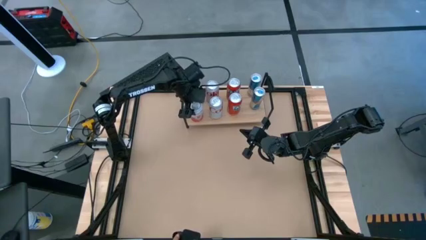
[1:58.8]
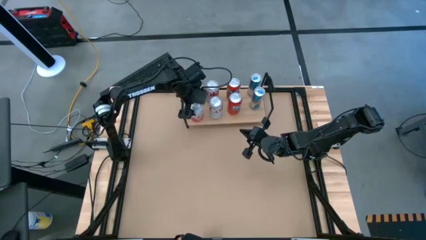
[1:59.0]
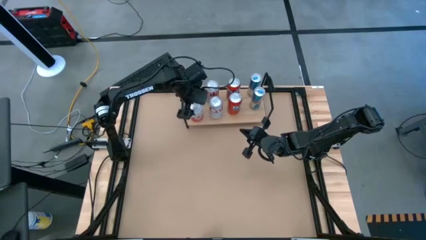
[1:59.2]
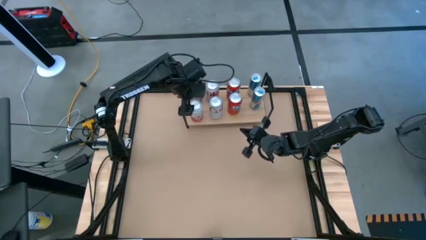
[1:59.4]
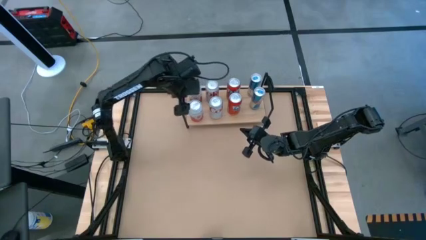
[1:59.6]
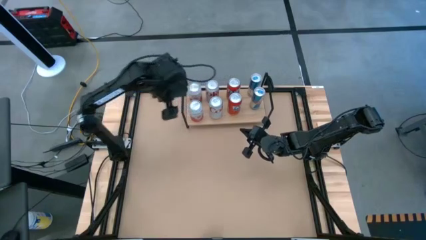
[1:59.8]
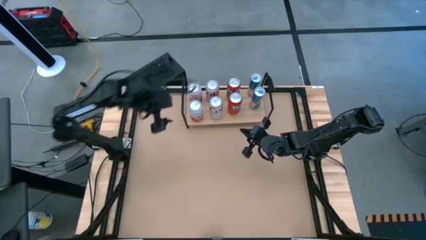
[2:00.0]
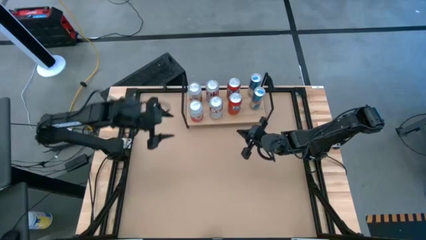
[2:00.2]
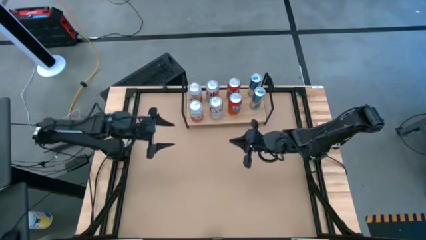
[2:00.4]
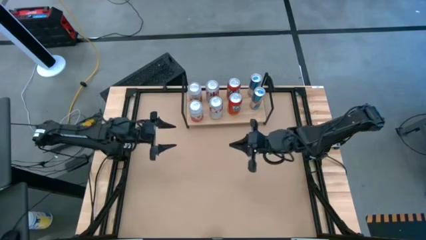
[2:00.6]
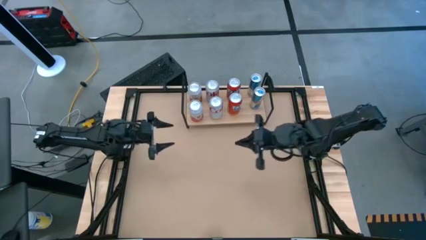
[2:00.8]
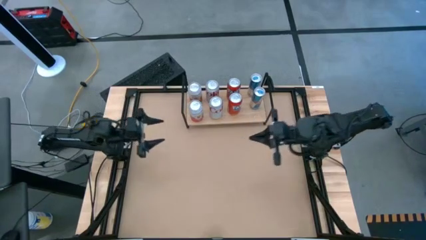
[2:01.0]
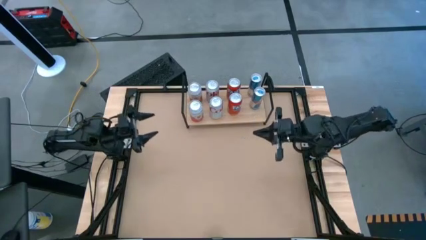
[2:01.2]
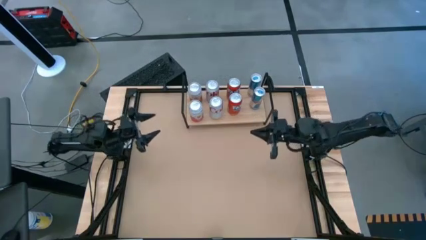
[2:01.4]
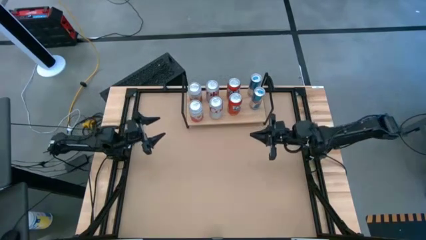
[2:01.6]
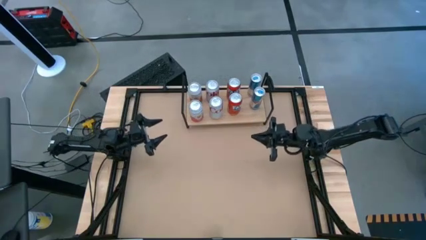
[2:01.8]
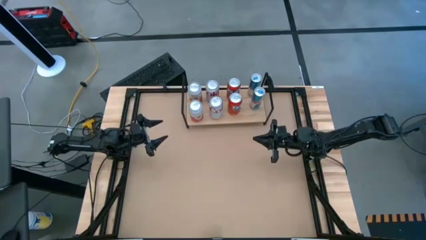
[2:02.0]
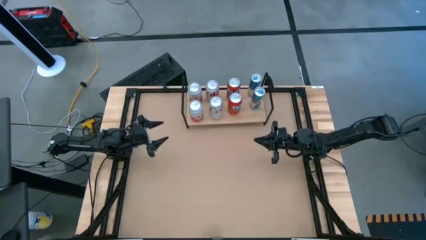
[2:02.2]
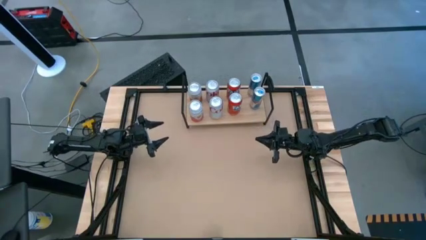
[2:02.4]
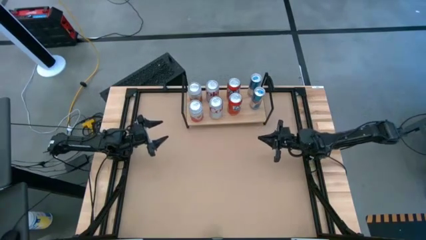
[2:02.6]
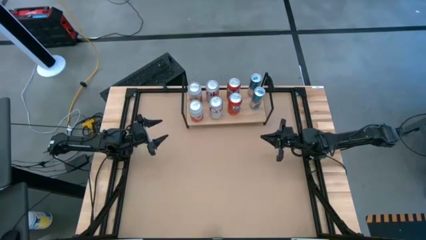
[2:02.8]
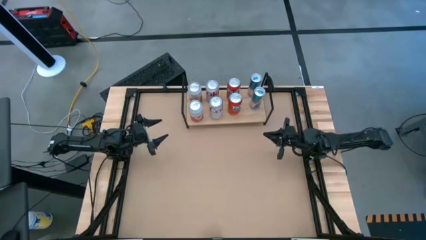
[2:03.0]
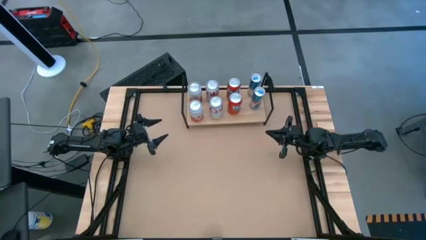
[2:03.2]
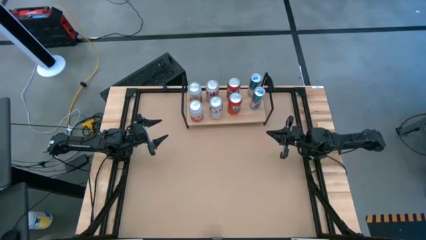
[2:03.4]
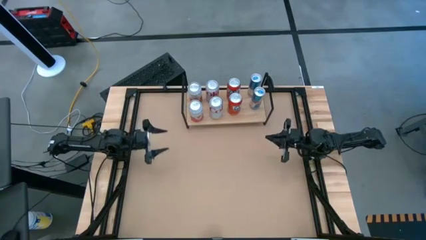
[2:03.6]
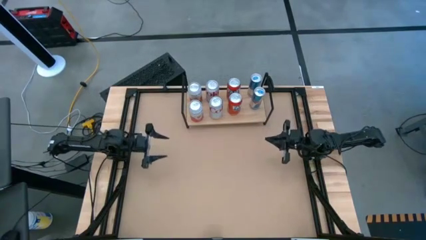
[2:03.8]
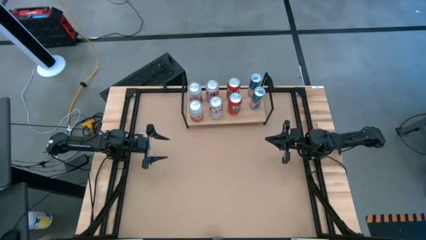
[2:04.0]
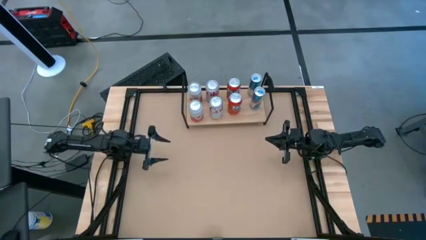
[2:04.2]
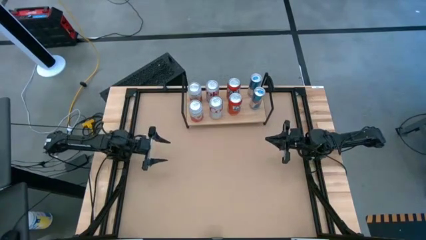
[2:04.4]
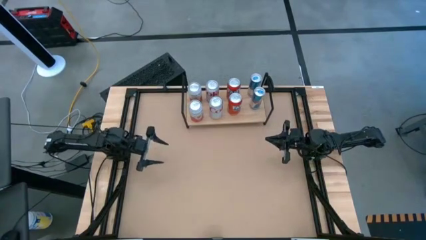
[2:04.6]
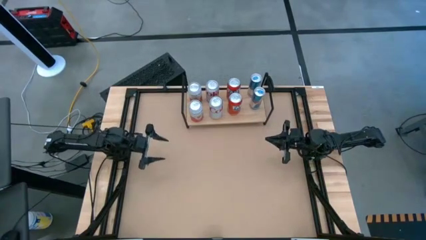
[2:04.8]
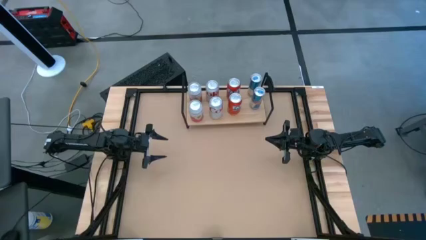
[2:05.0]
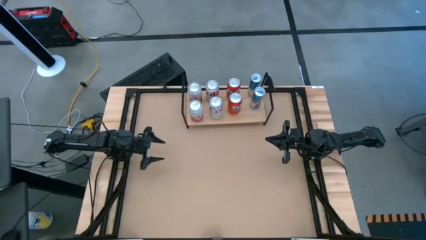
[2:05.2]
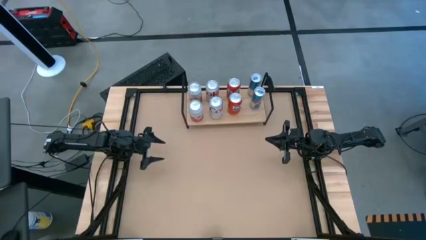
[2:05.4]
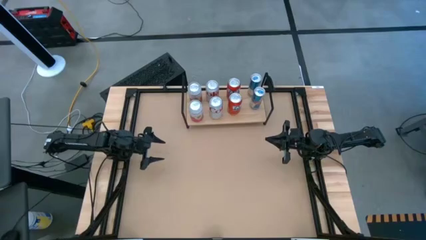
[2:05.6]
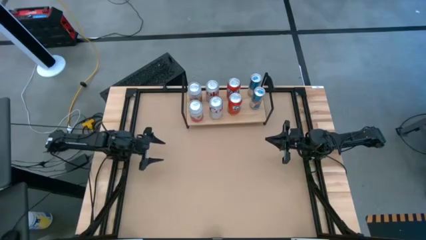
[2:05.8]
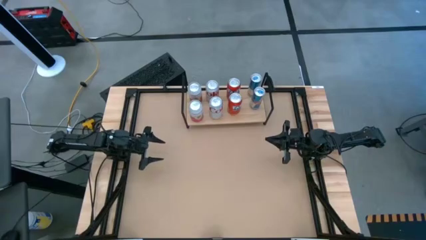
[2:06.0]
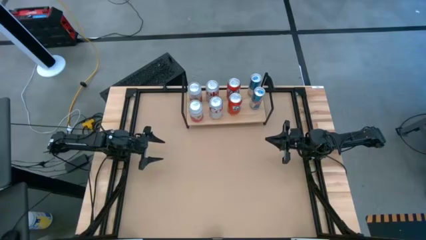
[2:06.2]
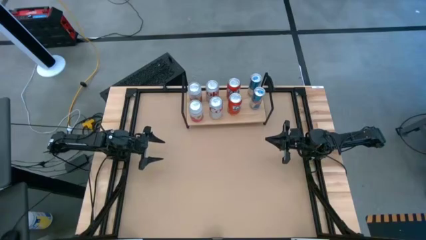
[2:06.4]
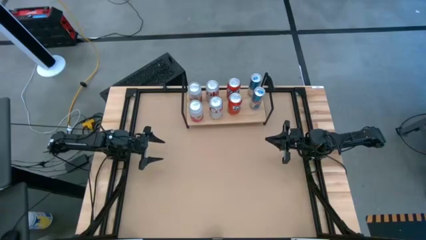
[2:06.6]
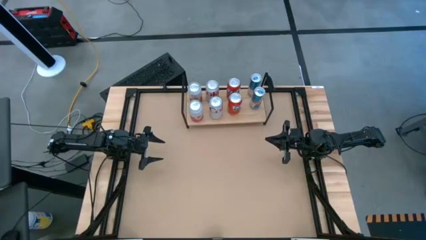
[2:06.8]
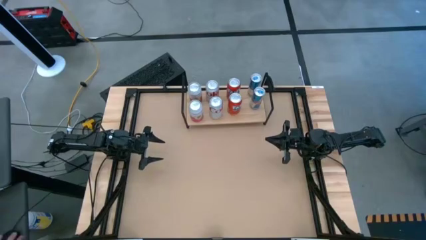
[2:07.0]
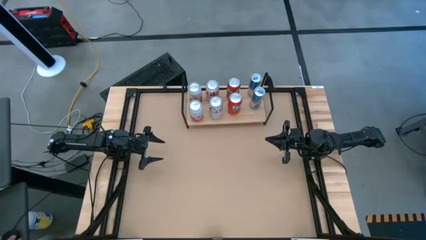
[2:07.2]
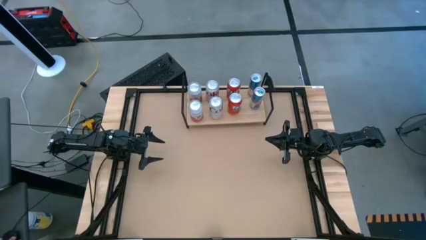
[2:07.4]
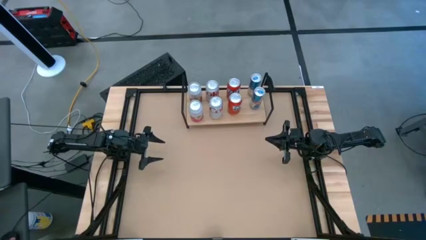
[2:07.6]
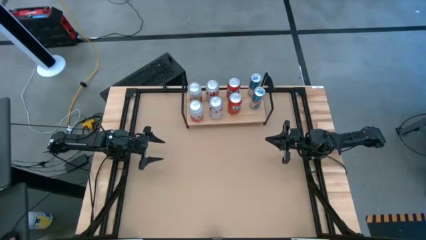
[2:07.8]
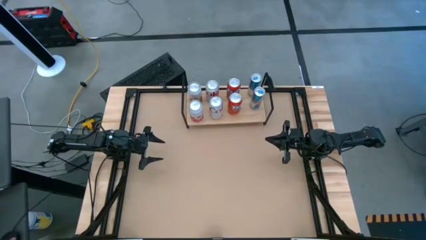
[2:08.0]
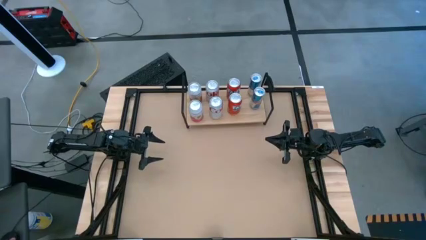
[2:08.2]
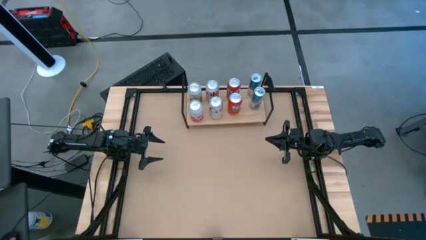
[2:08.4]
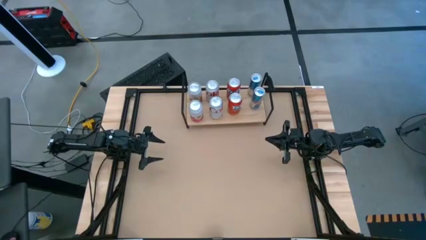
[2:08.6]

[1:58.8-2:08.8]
Task: Place canned beverage on shelf
Return to Home Position

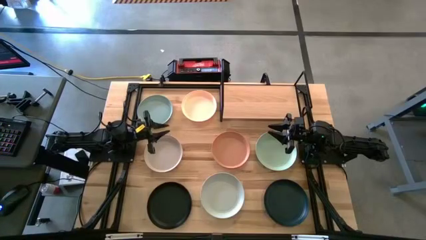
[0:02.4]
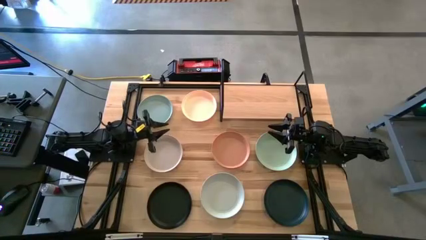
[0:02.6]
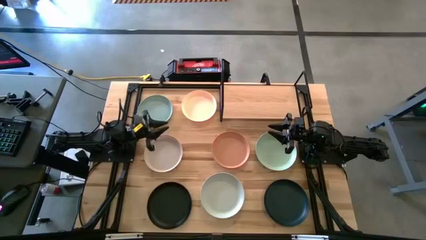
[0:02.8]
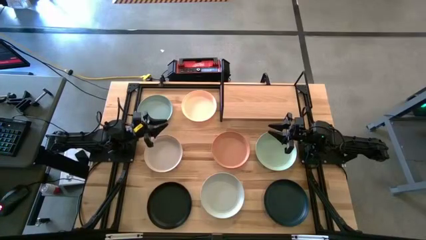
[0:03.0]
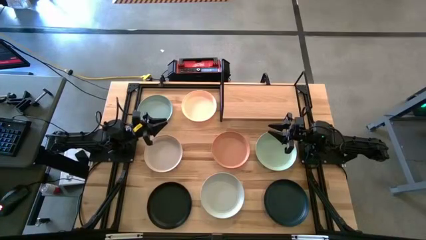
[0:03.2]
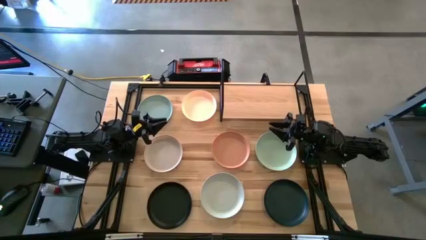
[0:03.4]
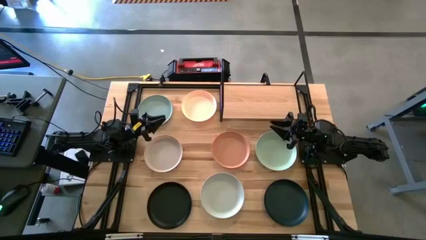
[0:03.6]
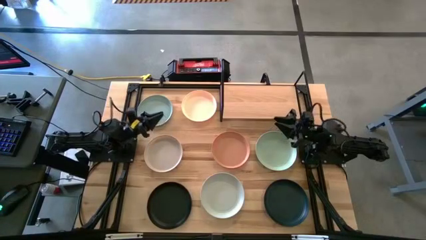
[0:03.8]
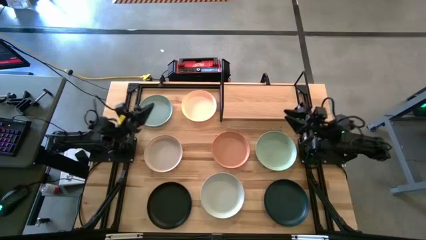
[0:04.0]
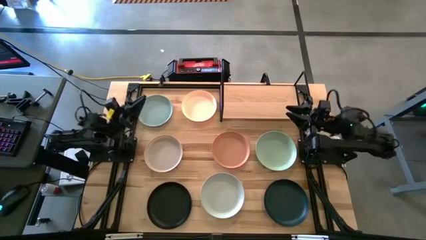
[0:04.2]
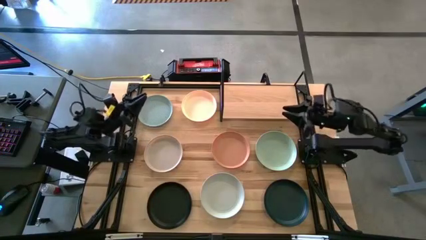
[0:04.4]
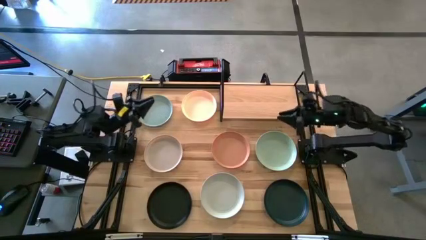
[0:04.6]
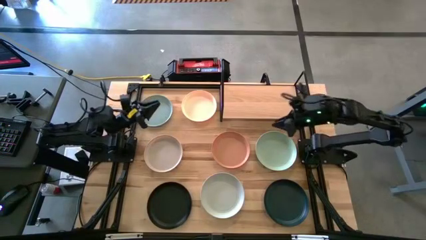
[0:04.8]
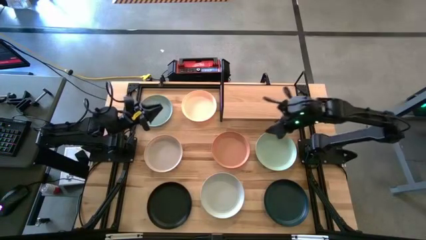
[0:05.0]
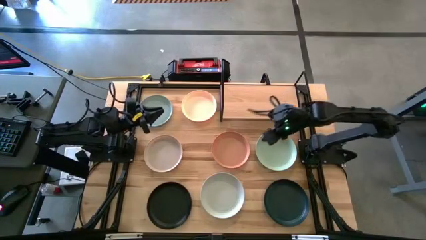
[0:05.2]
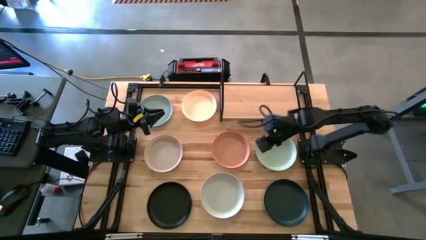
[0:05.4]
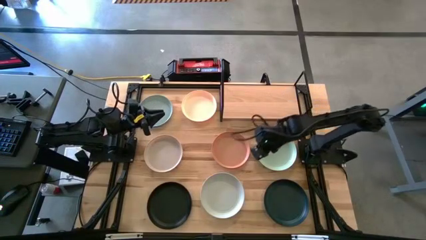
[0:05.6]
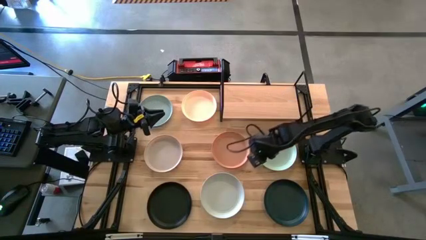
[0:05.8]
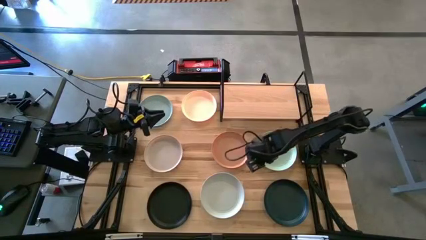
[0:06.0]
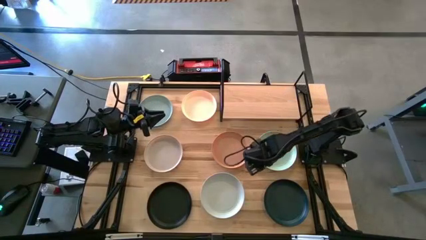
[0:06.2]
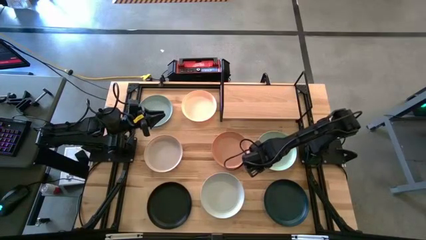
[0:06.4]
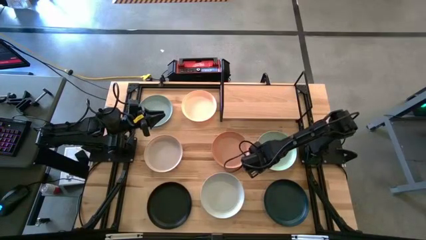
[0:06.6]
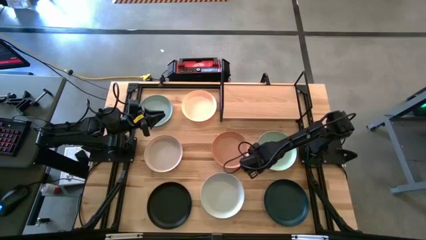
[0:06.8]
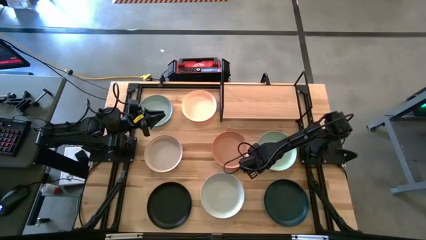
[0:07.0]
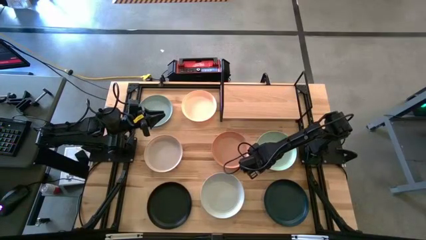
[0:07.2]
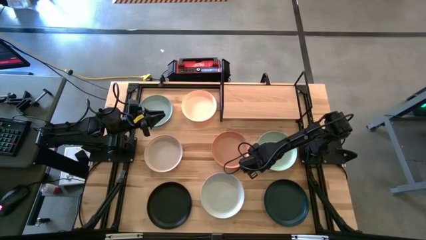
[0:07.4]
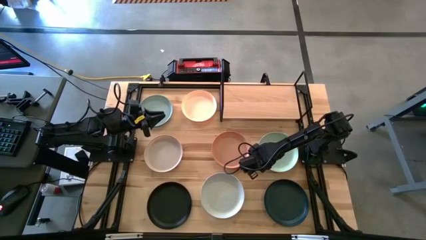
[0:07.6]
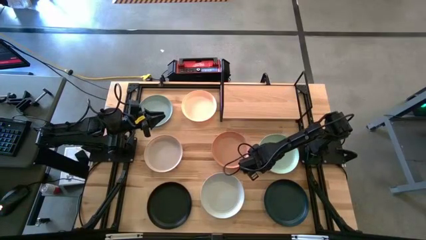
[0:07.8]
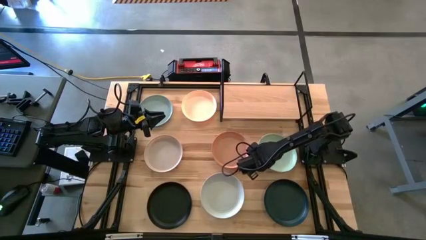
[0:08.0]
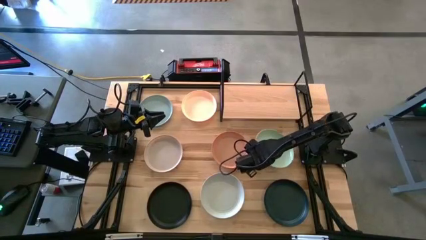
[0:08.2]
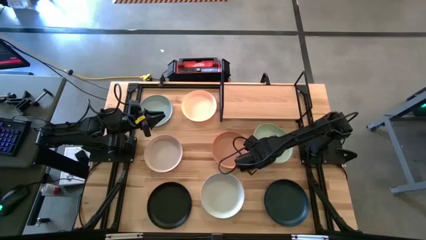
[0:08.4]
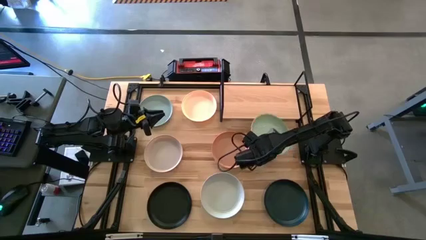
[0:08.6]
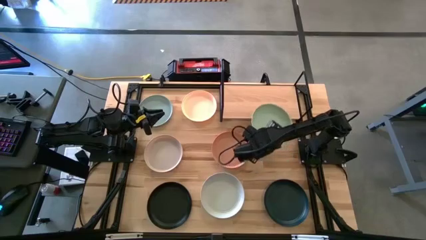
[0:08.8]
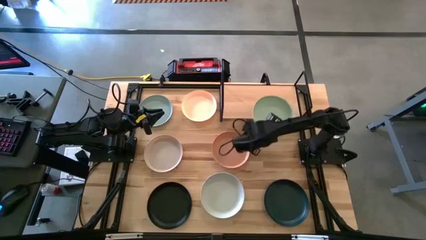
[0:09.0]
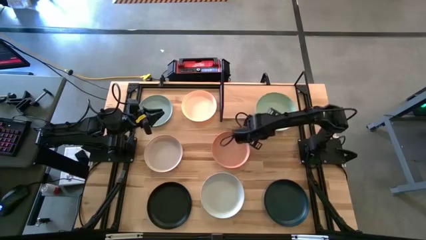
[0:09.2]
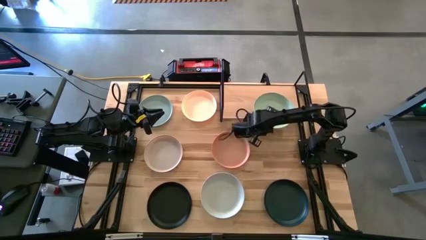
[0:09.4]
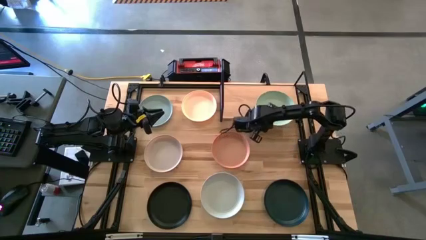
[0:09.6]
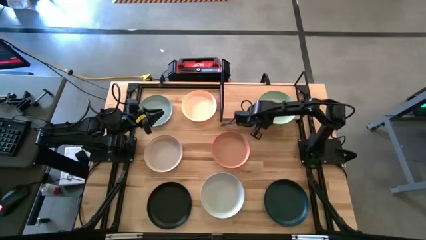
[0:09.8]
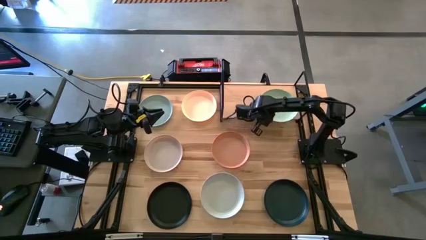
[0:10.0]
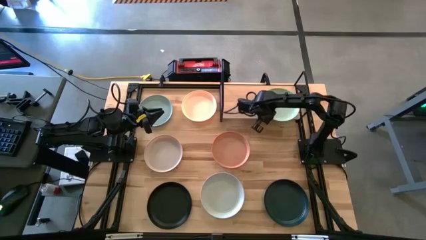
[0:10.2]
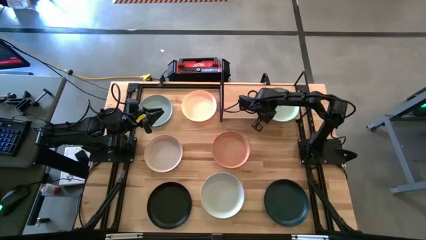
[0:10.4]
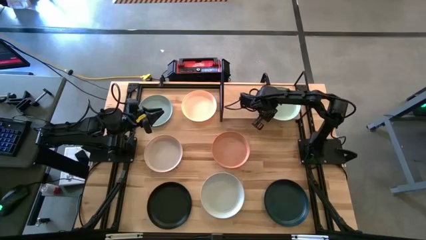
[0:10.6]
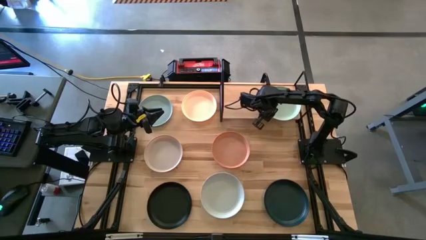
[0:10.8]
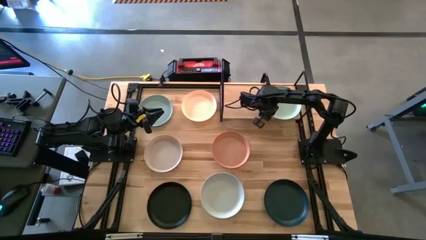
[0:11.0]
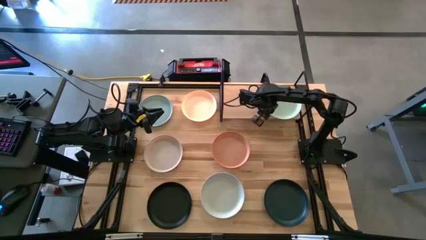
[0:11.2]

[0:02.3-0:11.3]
Task: Place and stack plates onto a shelf
Put the light green plate on the shelf
